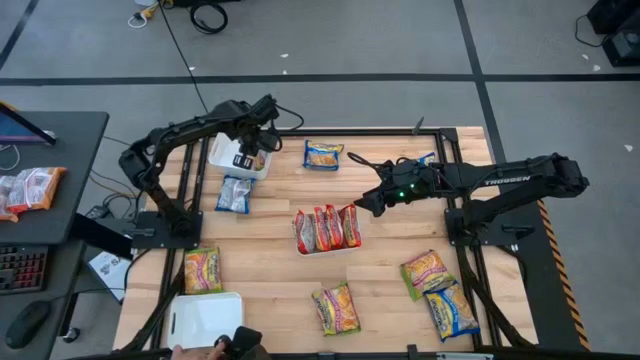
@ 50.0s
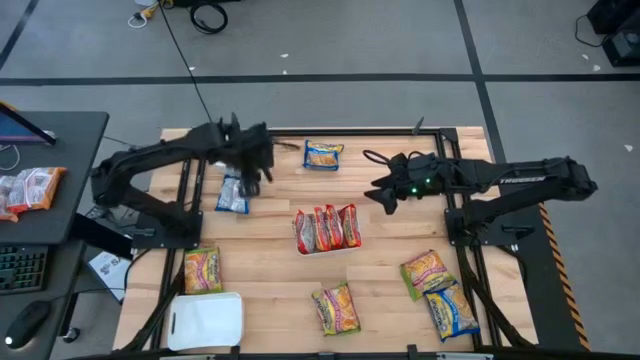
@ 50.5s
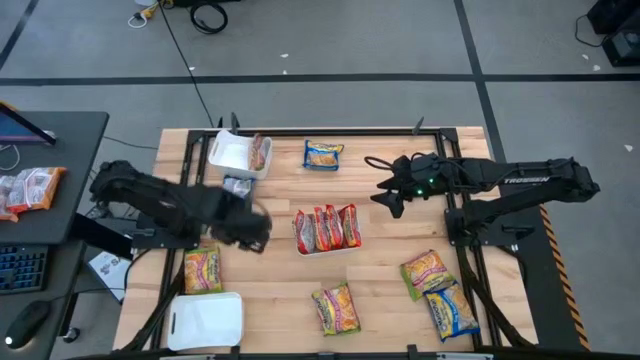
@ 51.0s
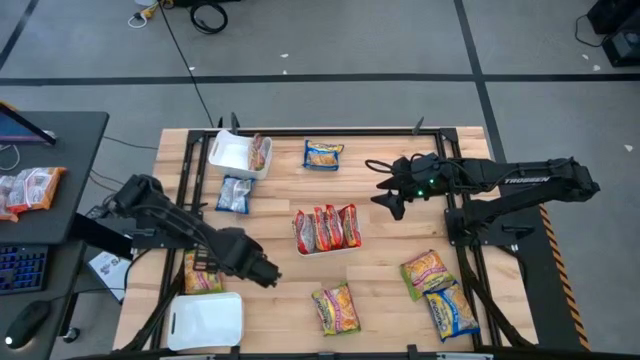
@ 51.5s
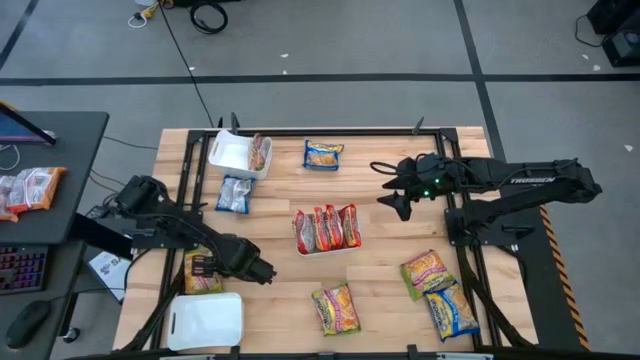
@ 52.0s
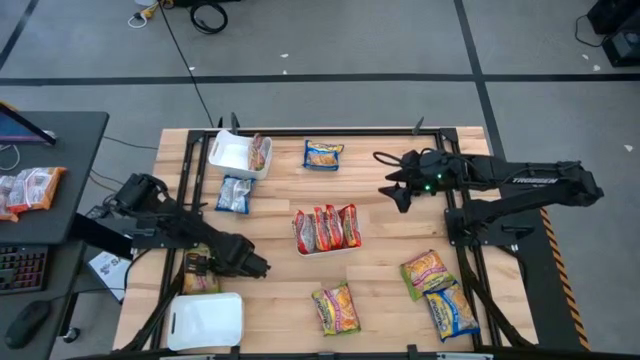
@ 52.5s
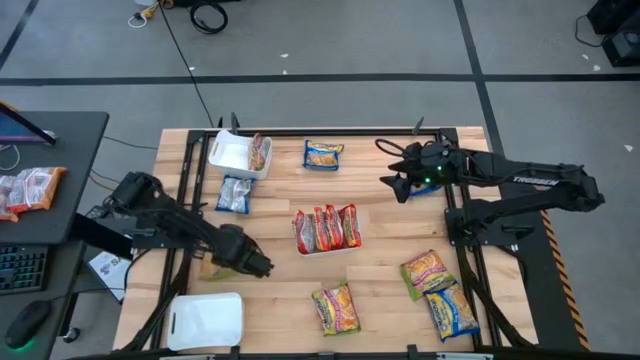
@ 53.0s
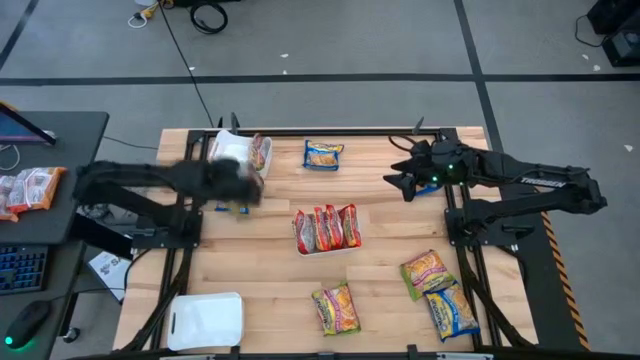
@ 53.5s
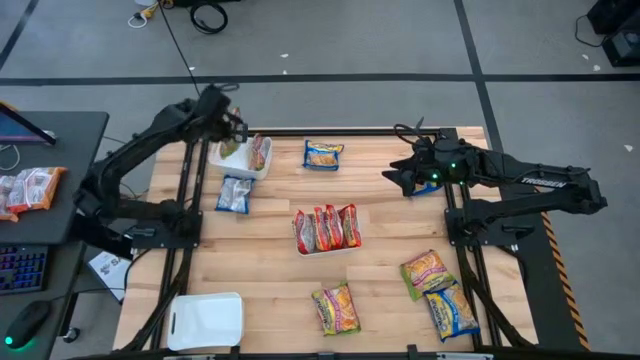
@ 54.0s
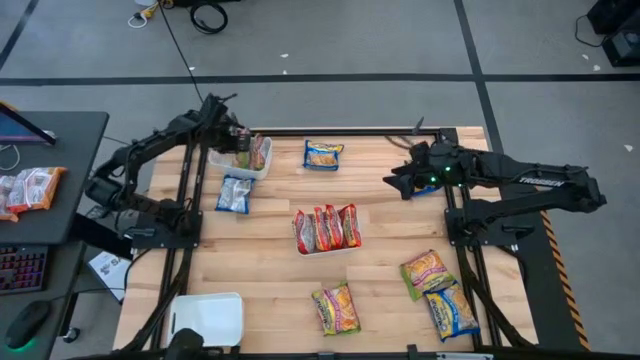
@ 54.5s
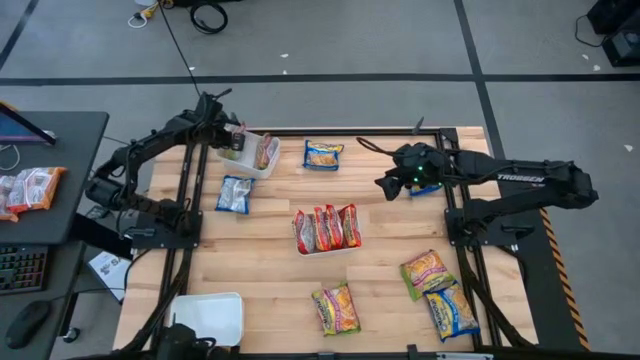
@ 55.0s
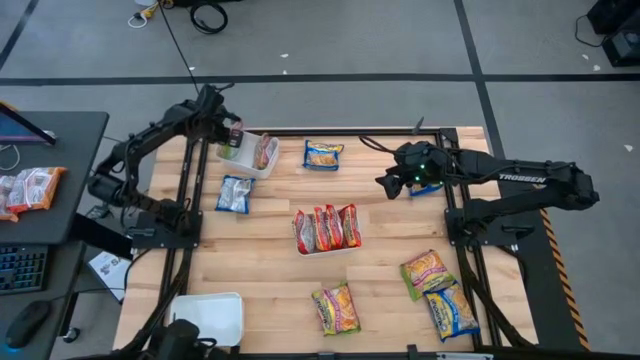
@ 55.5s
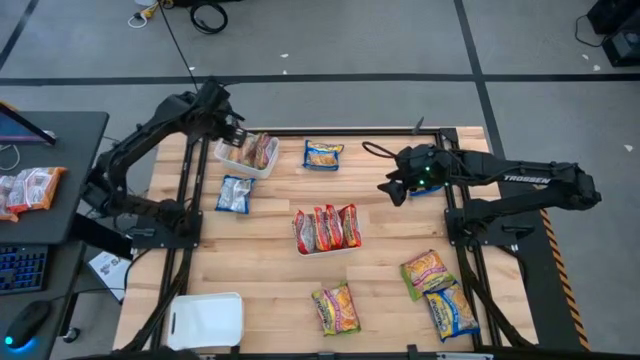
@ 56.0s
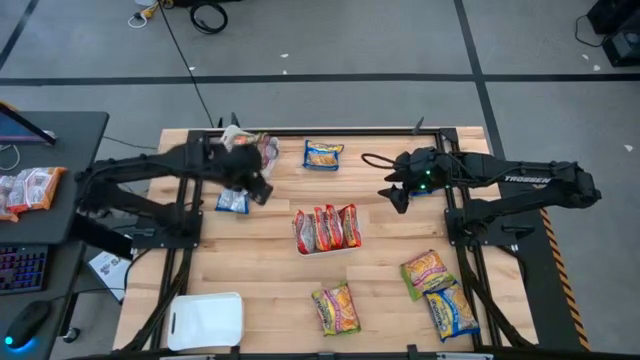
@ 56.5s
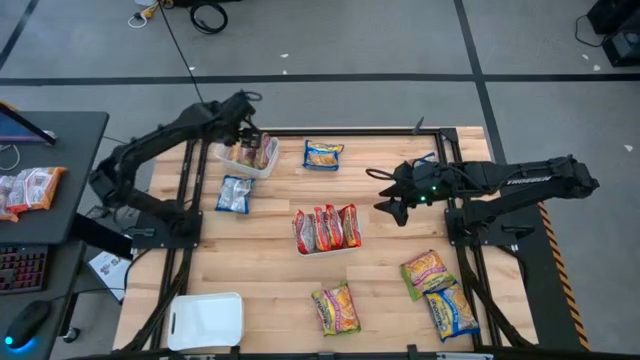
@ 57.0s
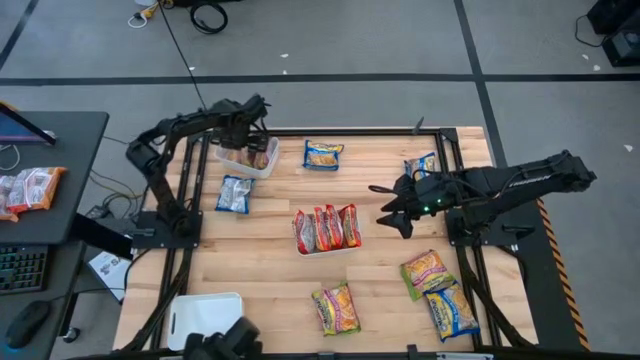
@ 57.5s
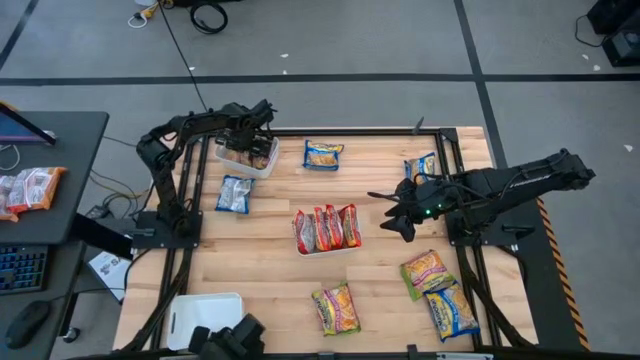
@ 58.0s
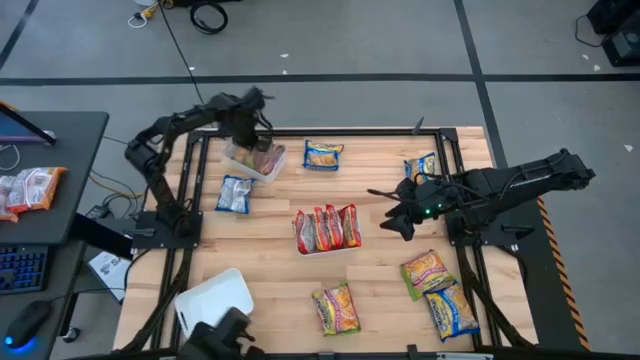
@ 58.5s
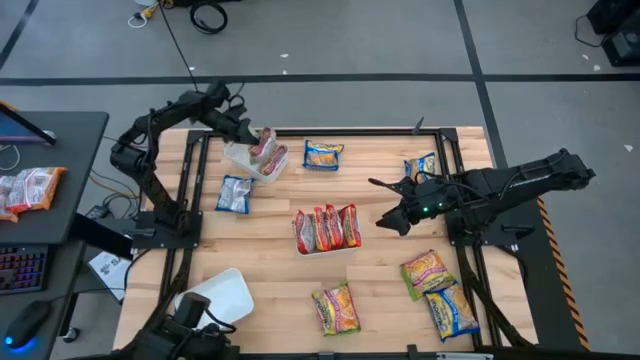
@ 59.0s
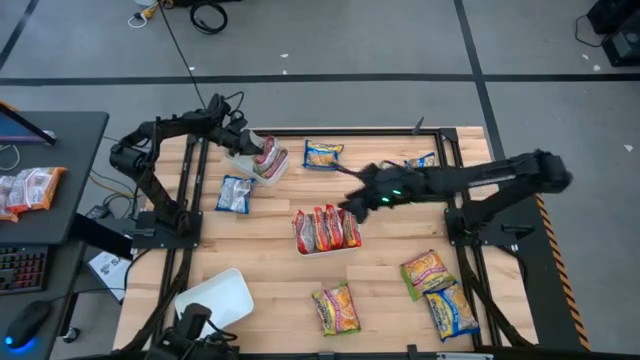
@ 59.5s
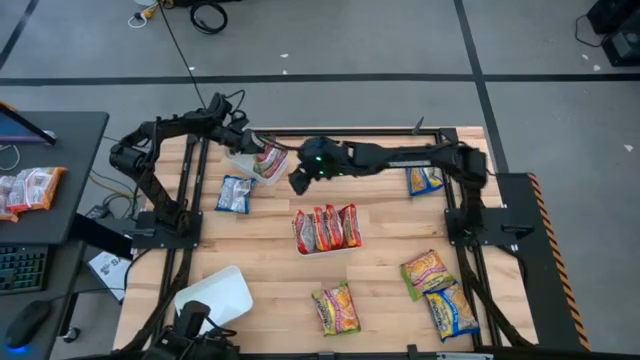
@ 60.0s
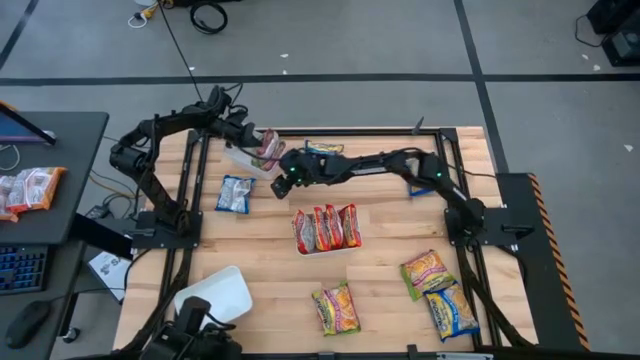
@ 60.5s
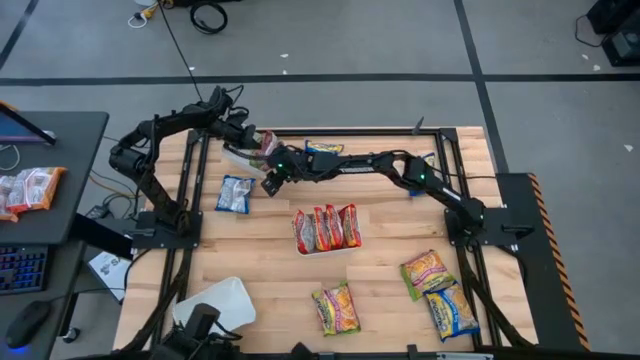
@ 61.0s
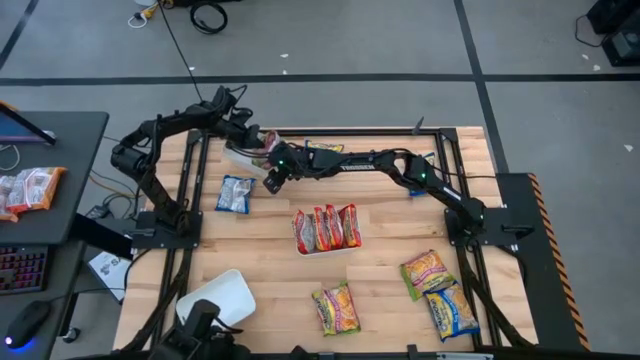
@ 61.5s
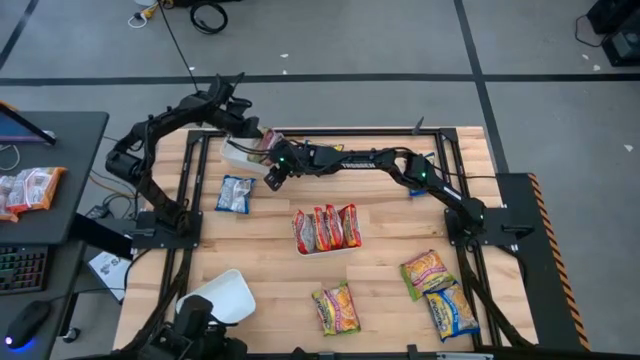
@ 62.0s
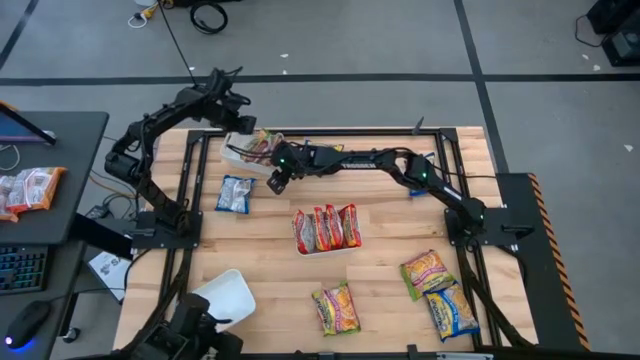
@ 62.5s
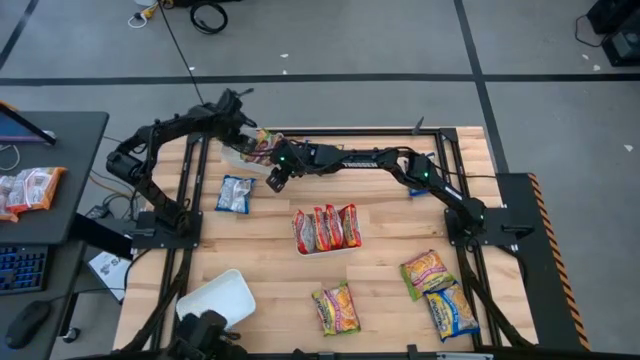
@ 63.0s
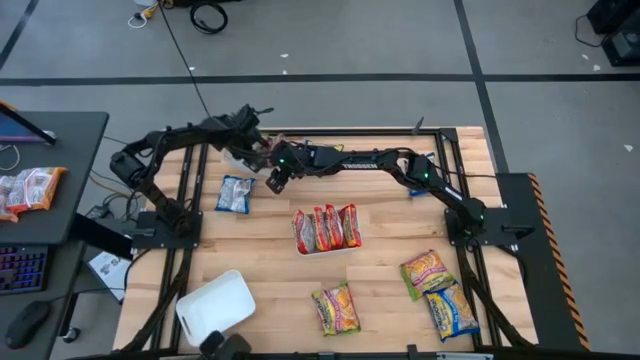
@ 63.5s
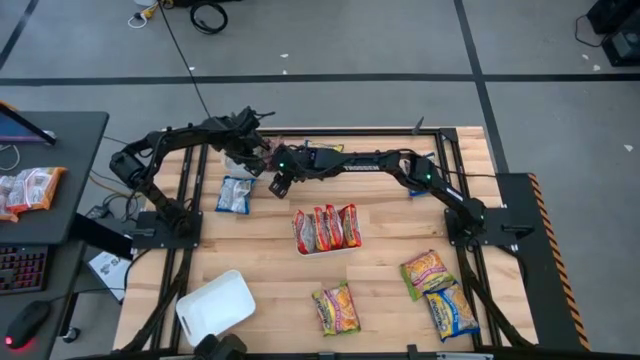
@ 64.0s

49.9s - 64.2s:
Task: Sort Maruchan noodles
Put the green noodle pack into the top white bin

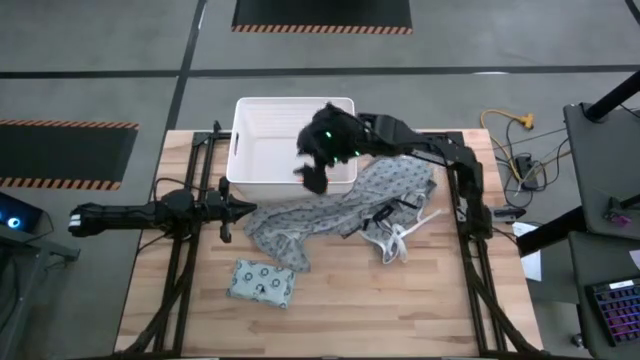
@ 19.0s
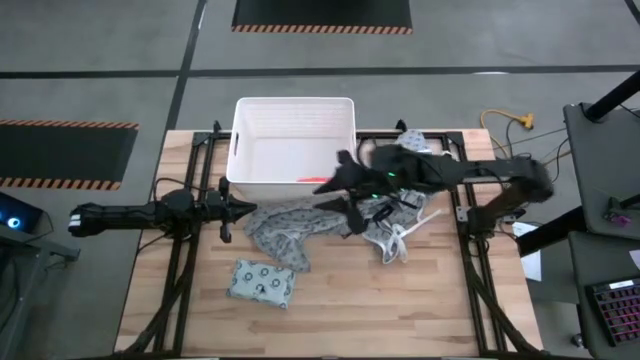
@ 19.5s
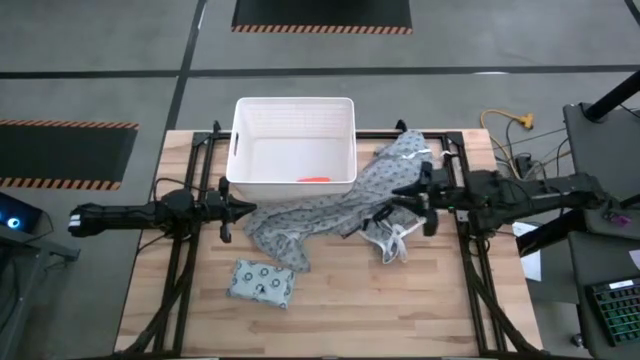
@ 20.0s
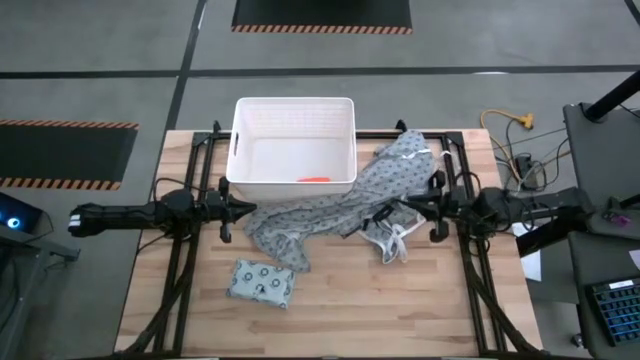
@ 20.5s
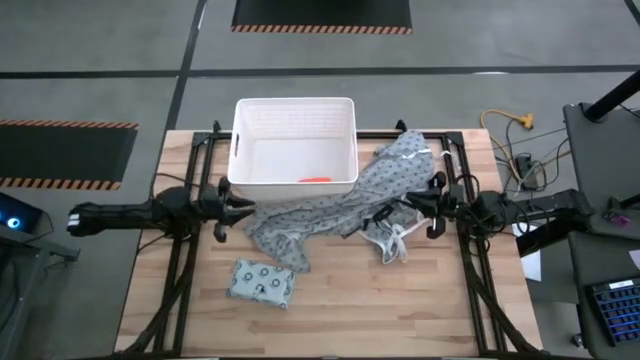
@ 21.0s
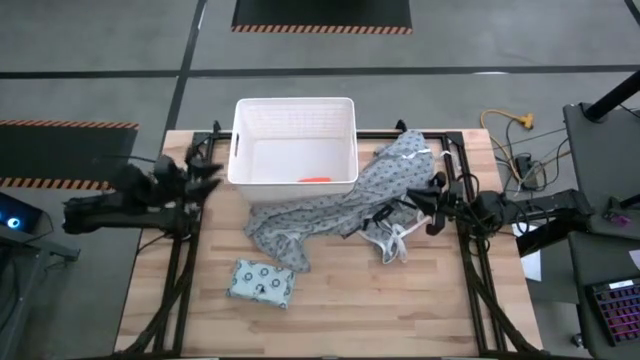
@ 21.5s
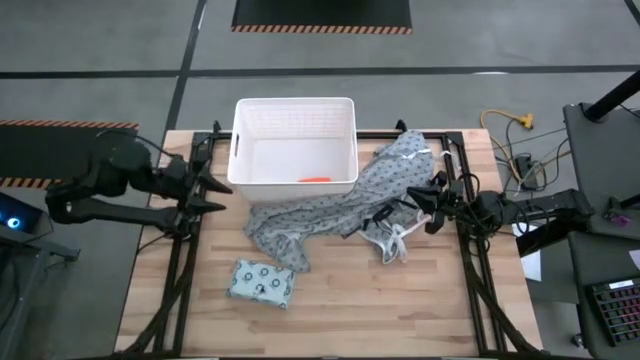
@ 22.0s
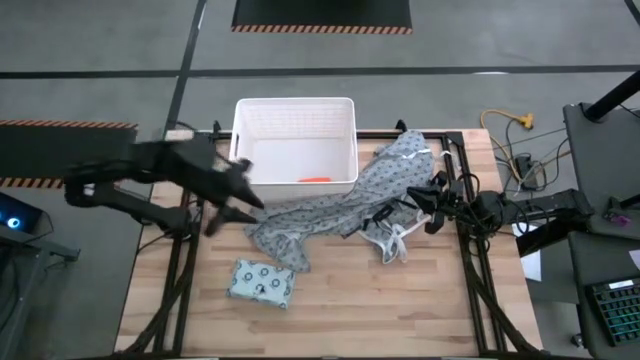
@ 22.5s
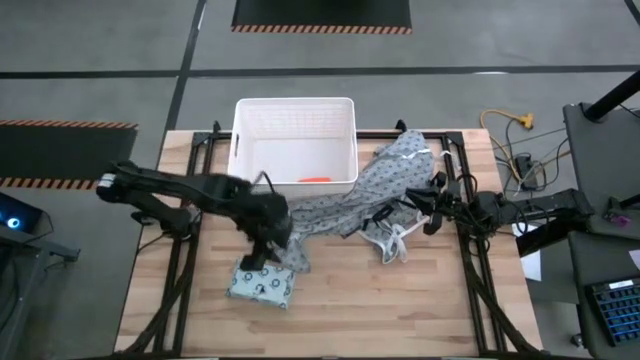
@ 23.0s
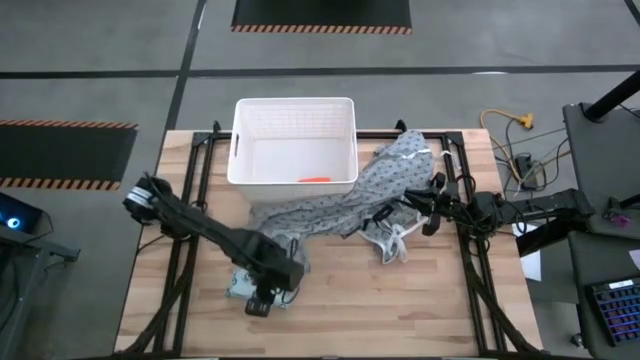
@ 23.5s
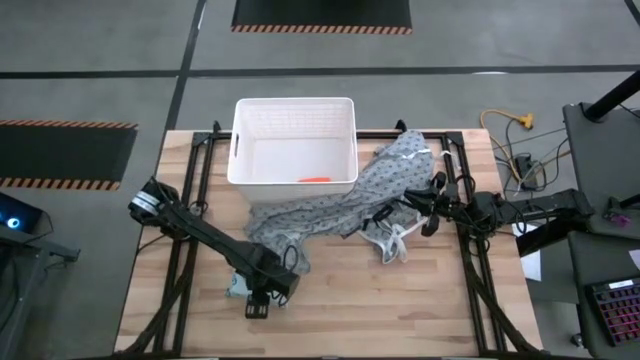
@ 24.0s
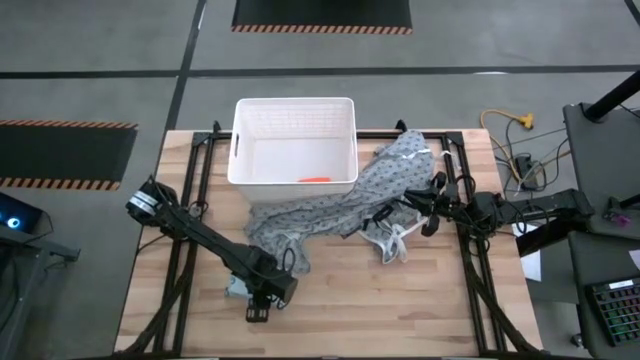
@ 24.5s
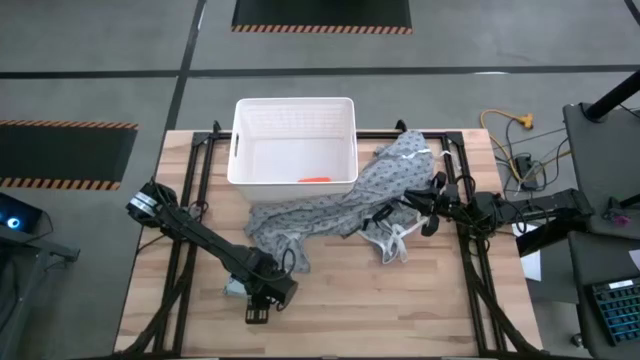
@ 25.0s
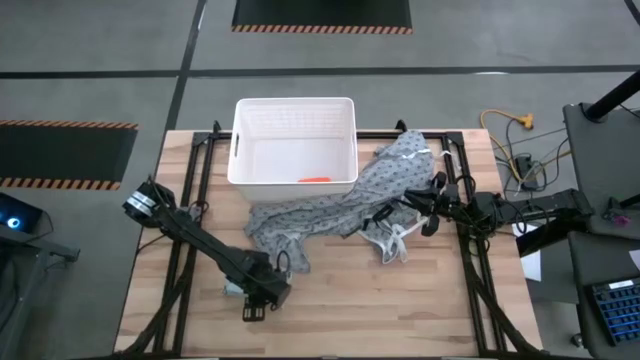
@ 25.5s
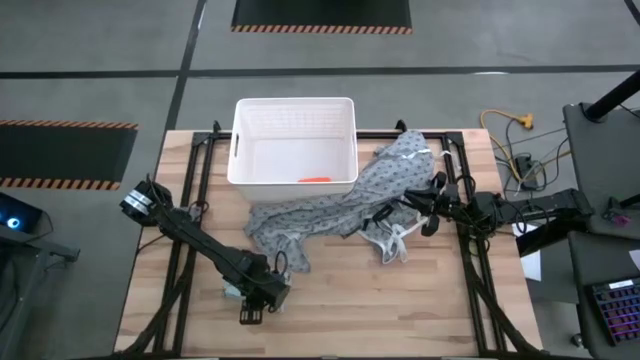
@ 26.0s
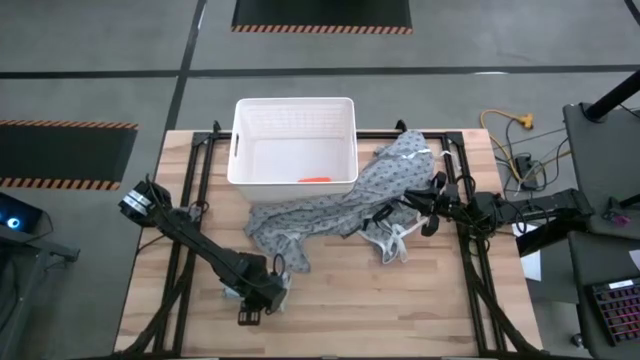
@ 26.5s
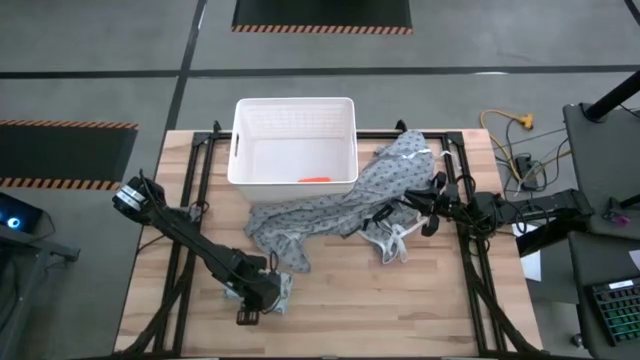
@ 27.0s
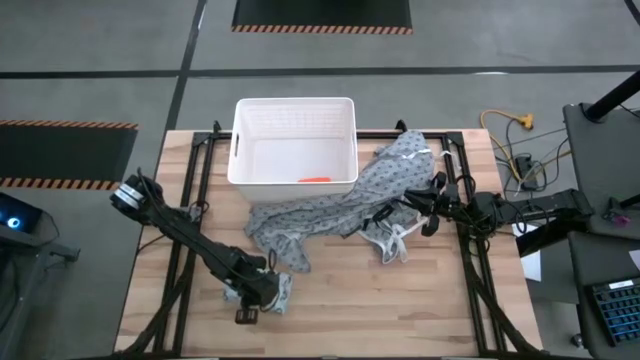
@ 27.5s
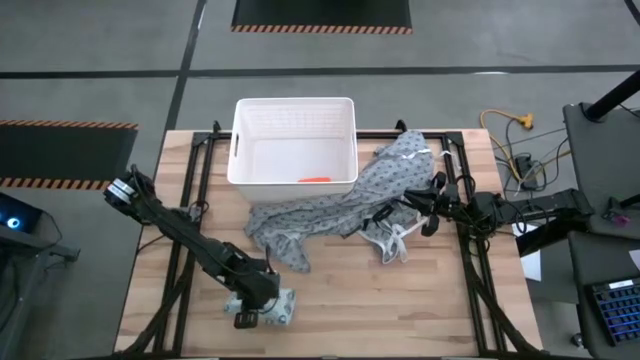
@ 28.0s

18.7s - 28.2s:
Task: Pick & place medical supplies in basket/bin
Put the mailer bag into the white bin
